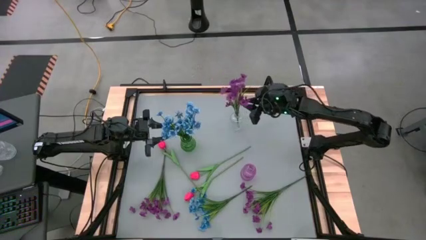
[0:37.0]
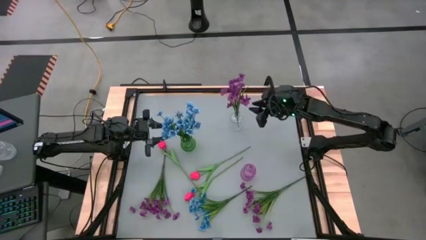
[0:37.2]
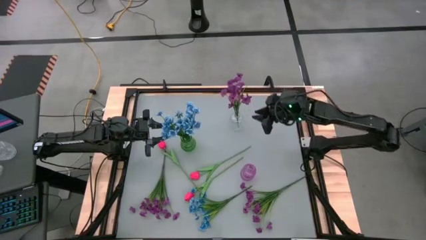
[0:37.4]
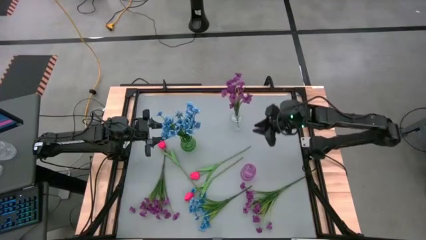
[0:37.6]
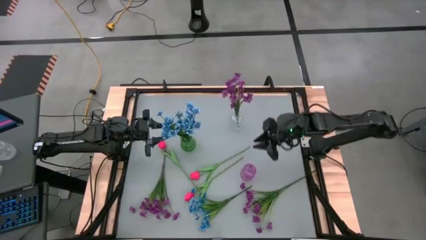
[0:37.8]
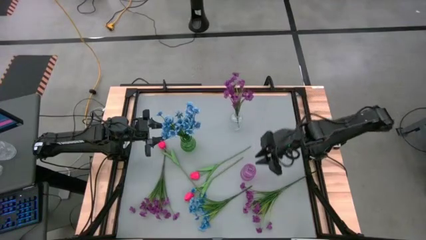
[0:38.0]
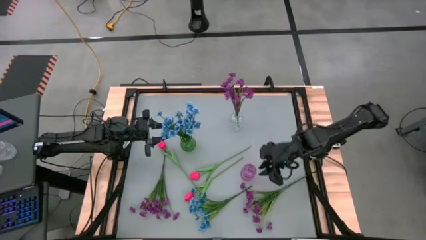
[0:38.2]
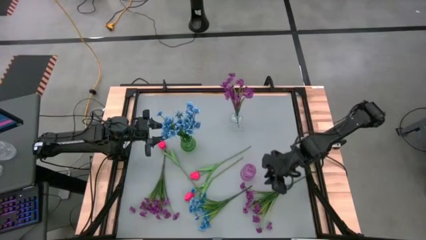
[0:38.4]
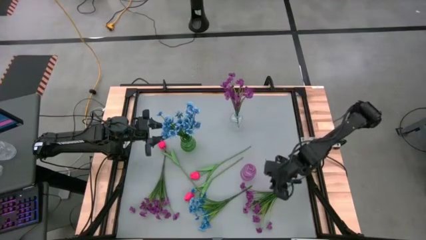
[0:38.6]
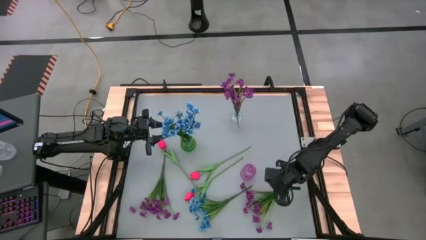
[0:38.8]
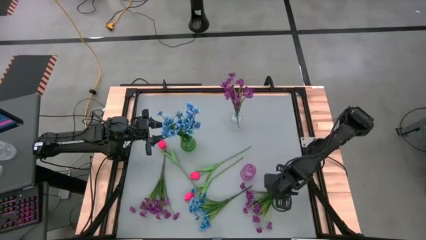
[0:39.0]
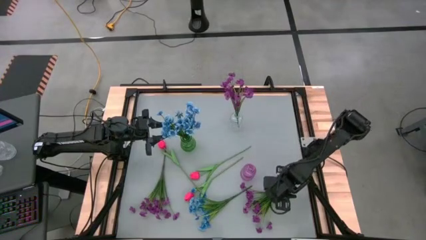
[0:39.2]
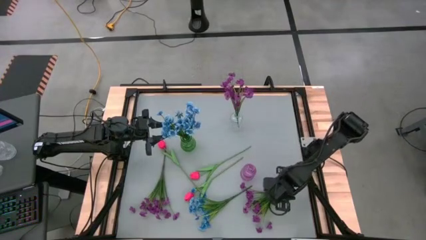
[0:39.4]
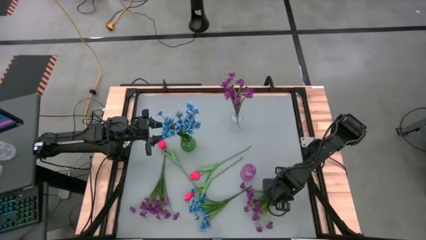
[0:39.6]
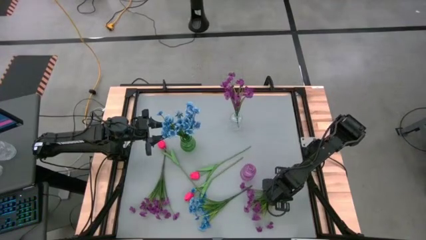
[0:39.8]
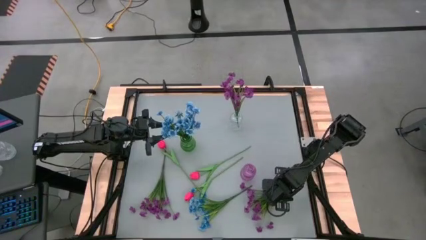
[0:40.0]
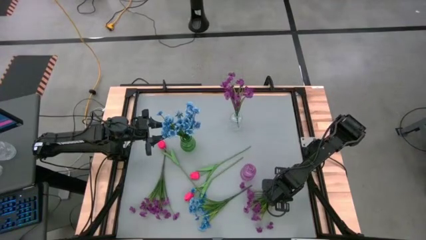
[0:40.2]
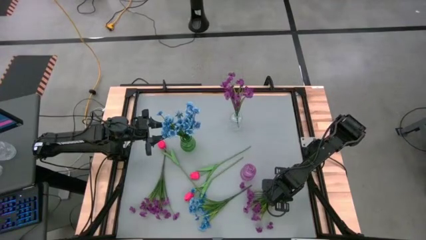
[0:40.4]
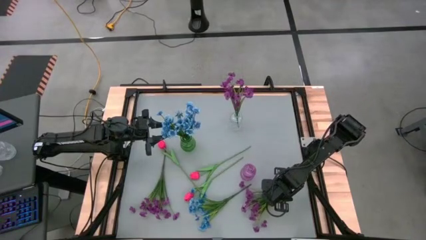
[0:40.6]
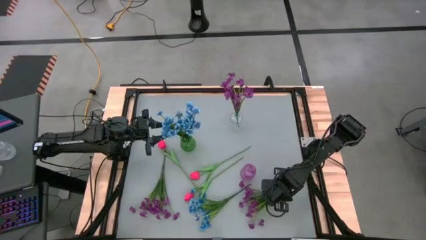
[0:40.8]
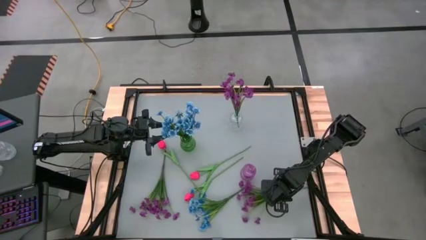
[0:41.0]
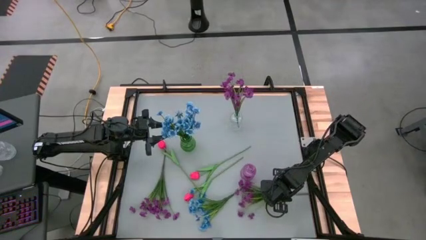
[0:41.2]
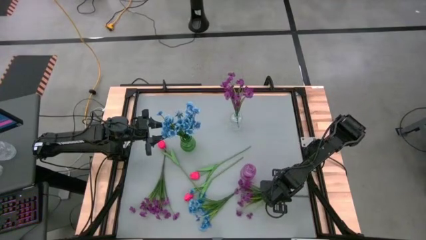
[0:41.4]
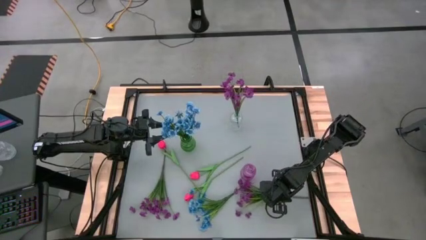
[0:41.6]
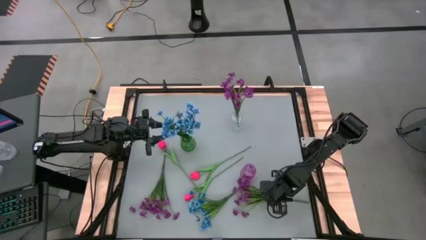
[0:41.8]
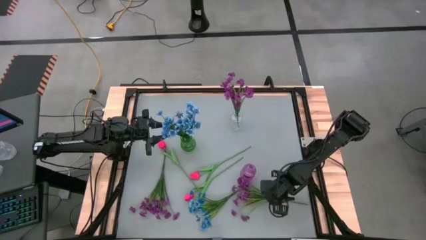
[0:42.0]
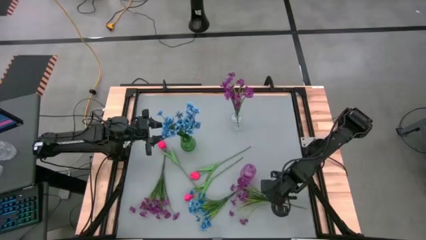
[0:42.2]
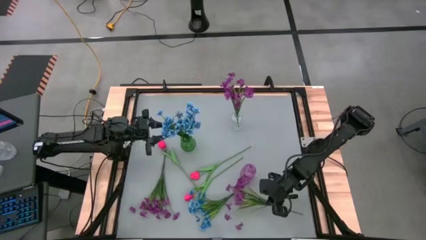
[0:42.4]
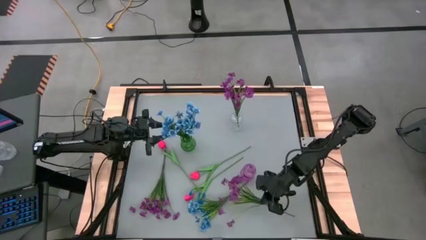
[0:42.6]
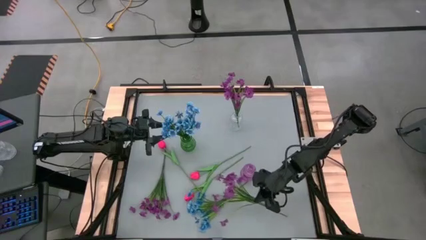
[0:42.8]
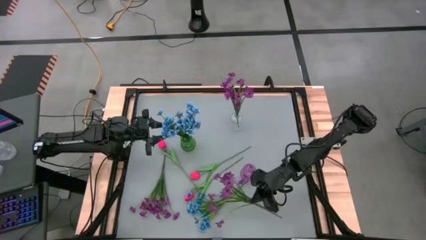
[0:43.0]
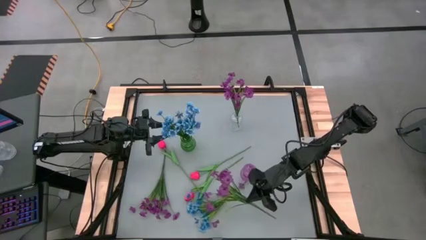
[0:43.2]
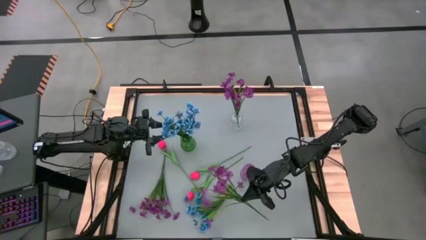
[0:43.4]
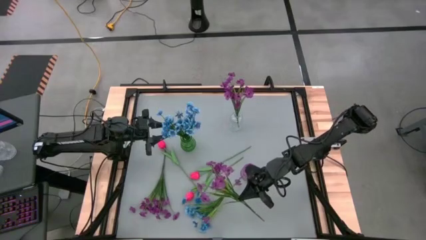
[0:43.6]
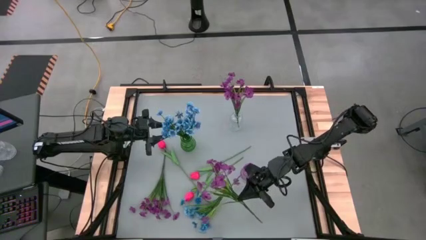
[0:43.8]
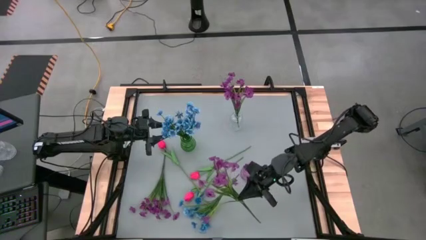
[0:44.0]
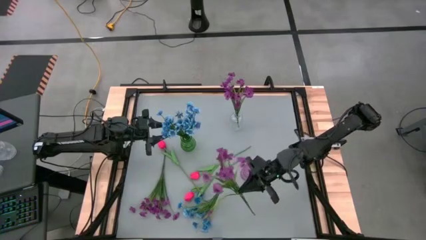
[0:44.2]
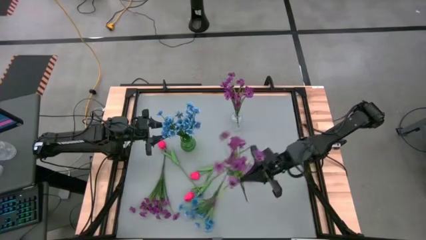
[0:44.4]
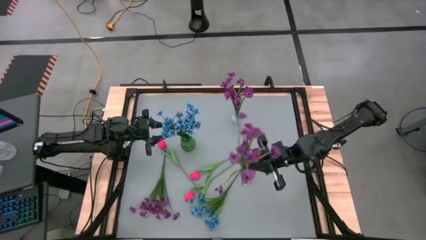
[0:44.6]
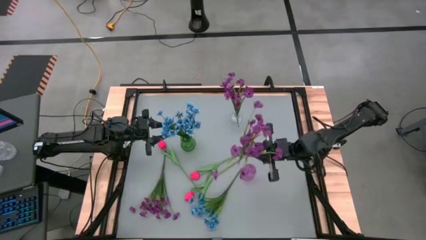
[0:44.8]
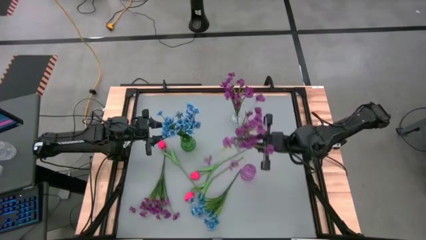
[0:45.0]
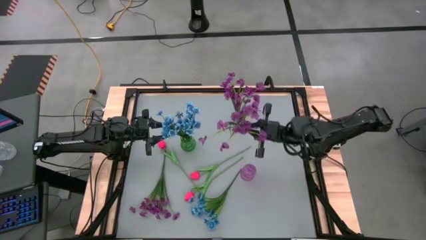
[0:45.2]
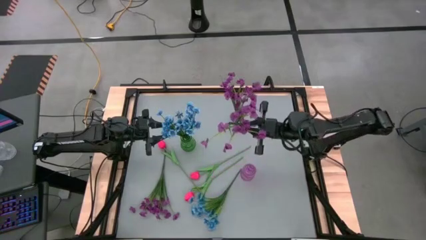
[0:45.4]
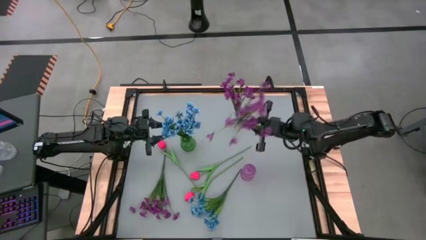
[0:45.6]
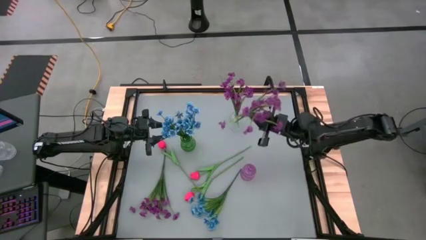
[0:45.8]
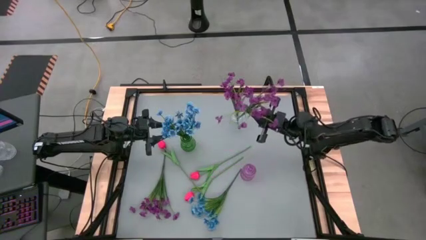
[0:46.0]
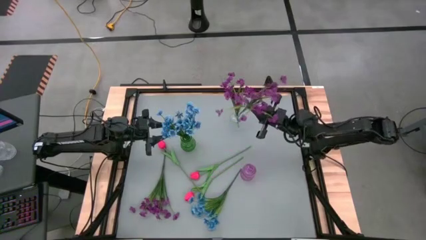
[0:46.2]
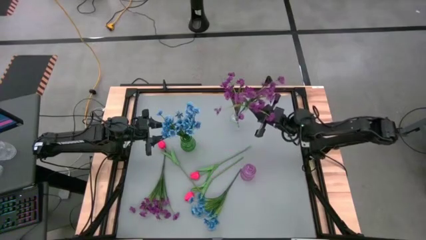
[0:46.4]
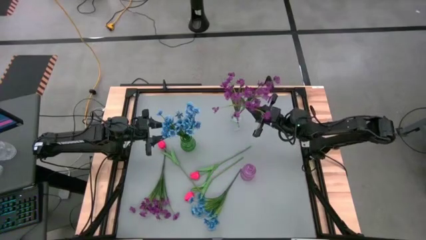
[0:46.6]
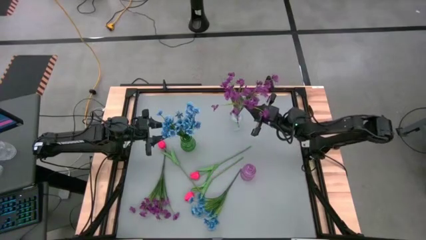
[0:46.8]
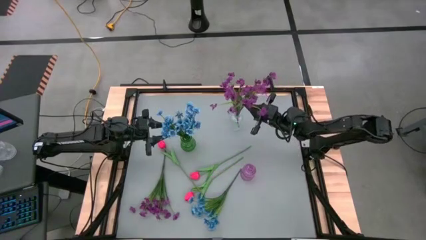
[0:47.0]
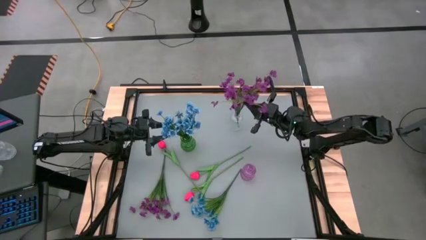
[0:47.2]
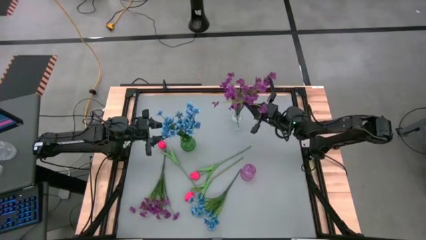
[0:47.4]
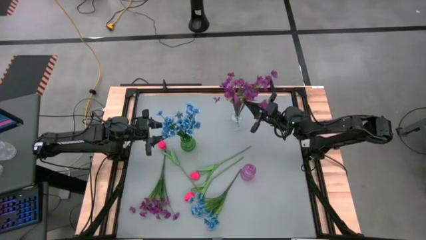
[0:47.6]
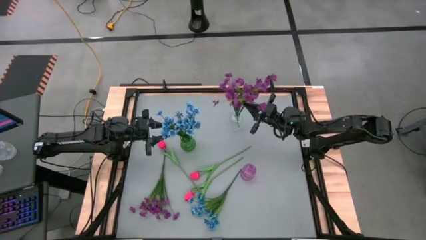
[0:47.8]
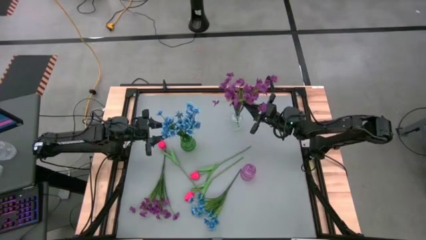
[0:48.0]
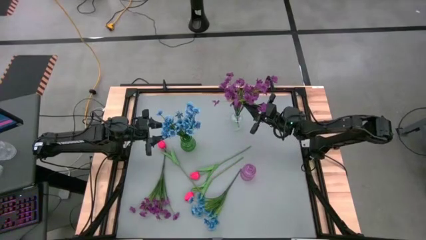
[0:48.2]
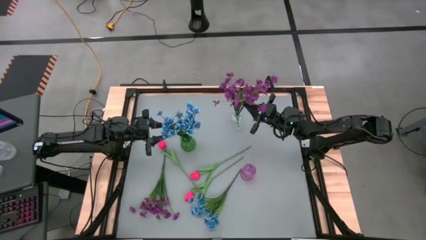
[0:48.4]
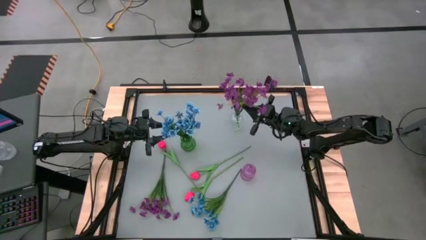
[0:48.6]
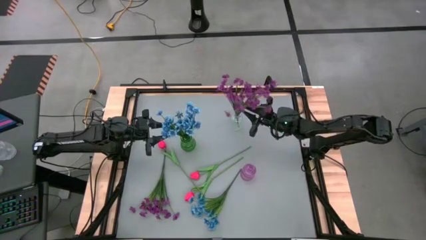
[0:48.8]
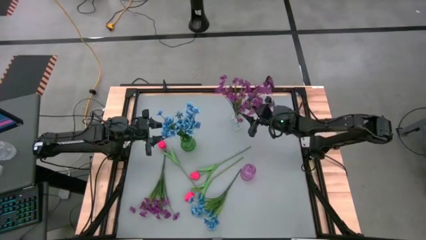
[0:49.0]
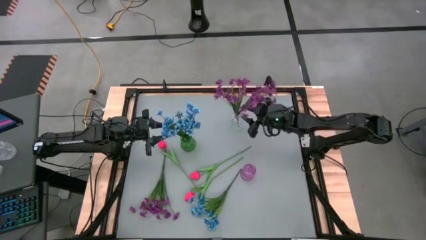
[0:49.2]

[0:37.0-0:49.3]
Task: Sort flowers into vase by color
Put the right purple flowers into the transparent flower vase
